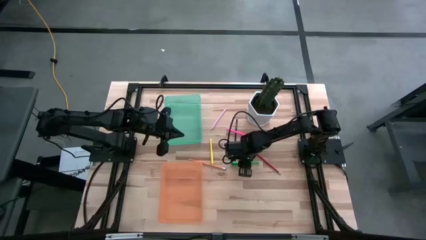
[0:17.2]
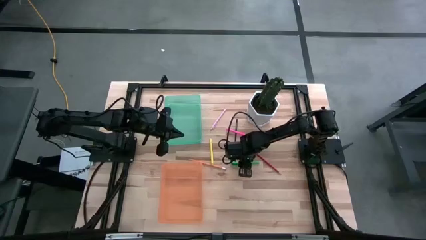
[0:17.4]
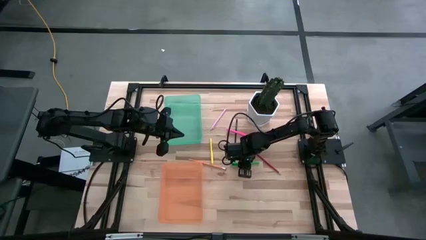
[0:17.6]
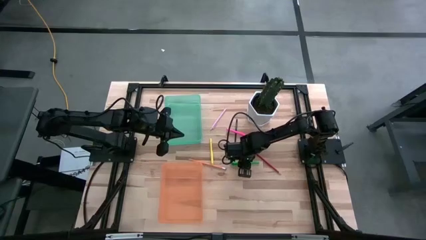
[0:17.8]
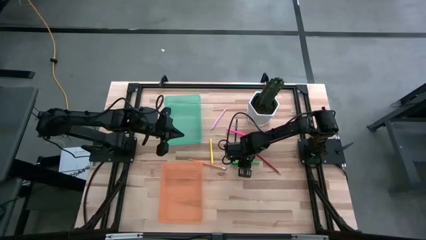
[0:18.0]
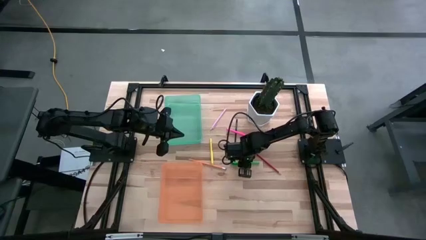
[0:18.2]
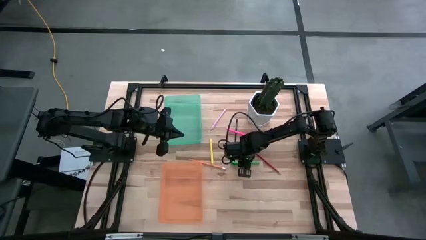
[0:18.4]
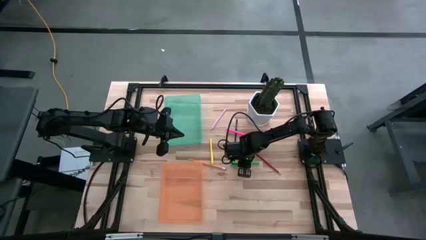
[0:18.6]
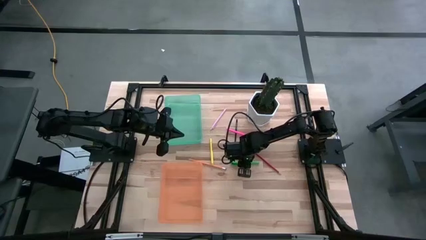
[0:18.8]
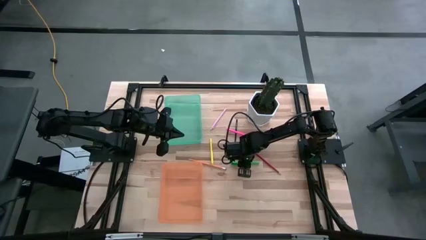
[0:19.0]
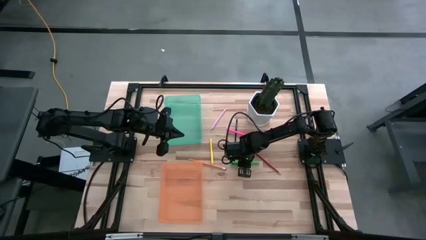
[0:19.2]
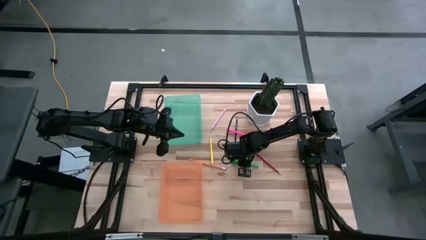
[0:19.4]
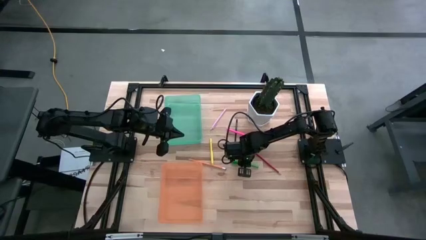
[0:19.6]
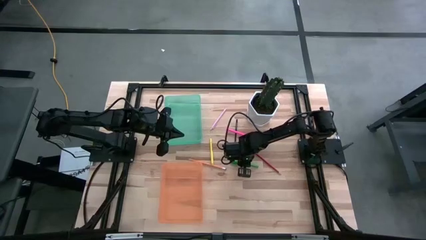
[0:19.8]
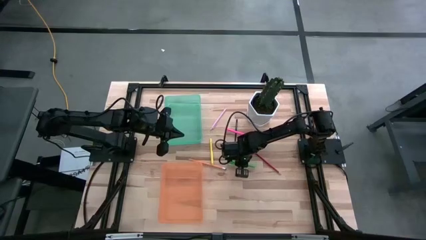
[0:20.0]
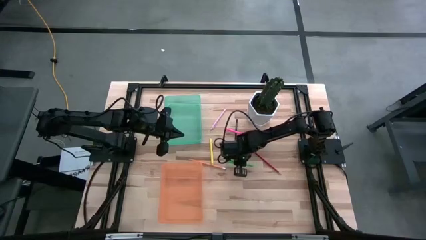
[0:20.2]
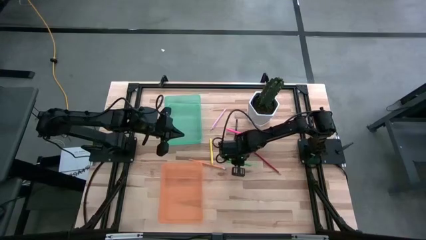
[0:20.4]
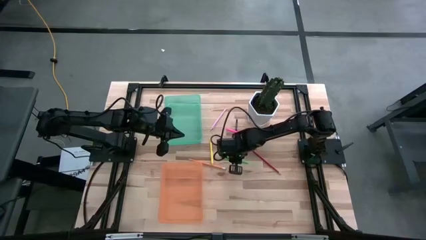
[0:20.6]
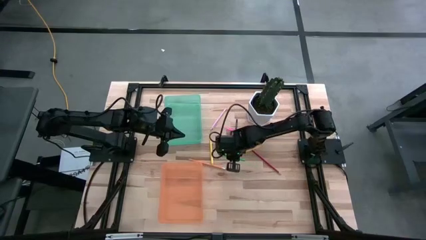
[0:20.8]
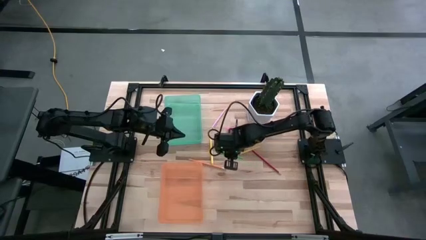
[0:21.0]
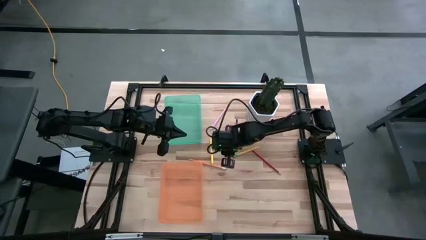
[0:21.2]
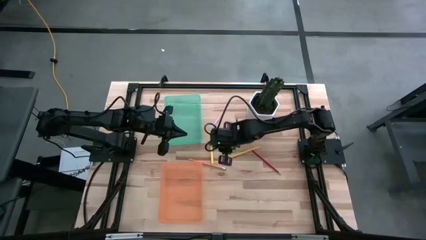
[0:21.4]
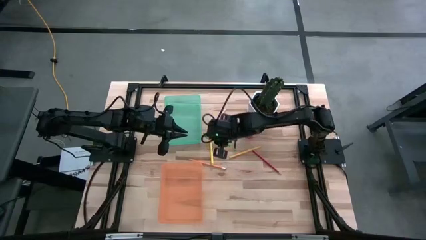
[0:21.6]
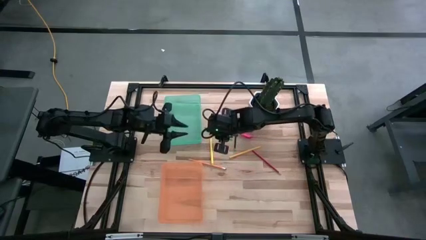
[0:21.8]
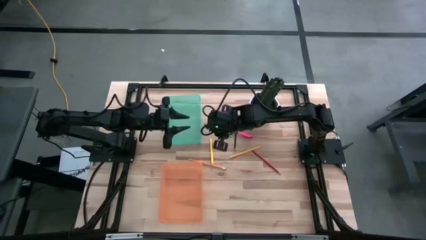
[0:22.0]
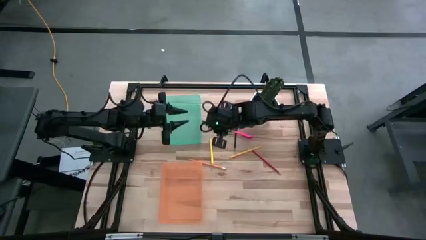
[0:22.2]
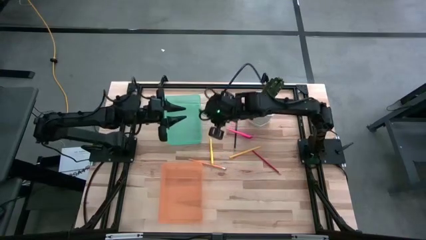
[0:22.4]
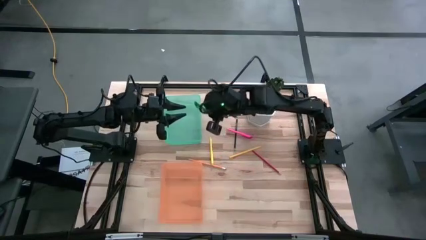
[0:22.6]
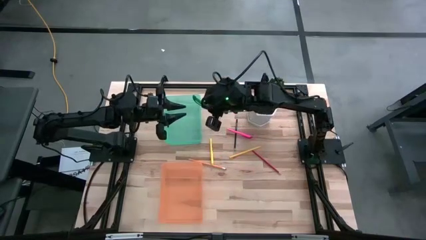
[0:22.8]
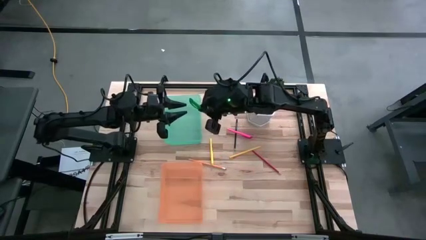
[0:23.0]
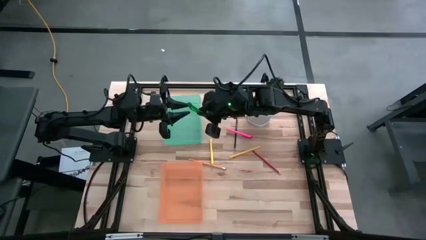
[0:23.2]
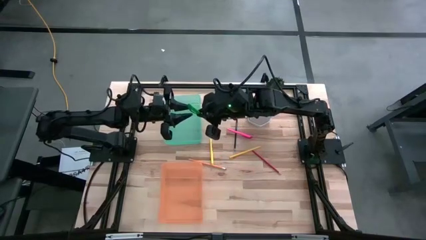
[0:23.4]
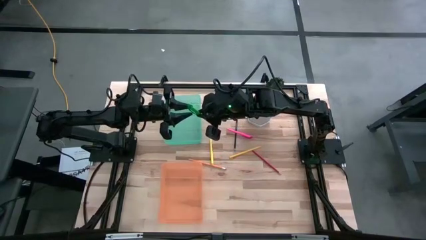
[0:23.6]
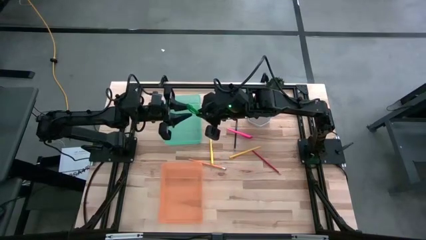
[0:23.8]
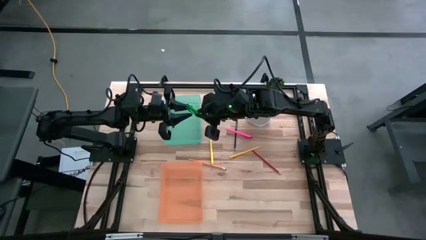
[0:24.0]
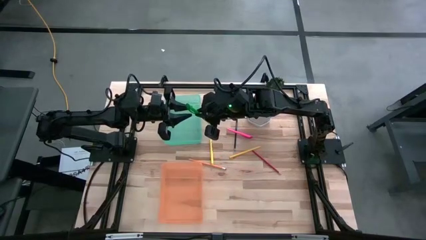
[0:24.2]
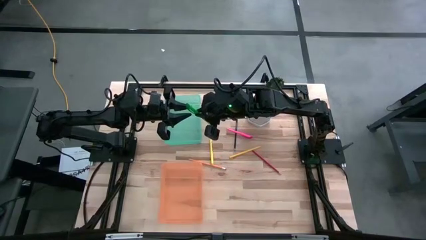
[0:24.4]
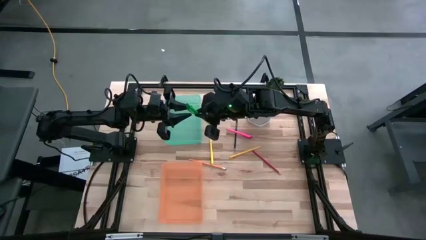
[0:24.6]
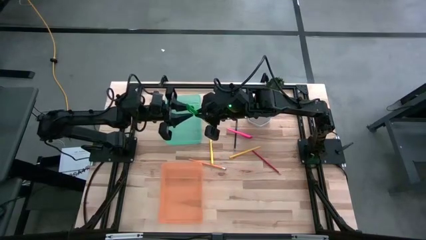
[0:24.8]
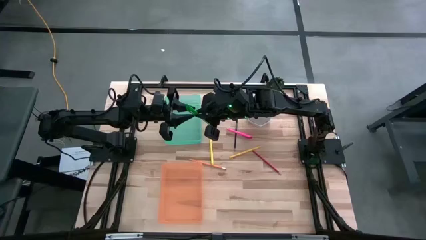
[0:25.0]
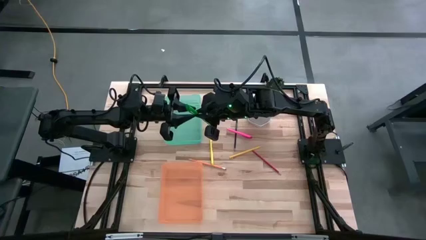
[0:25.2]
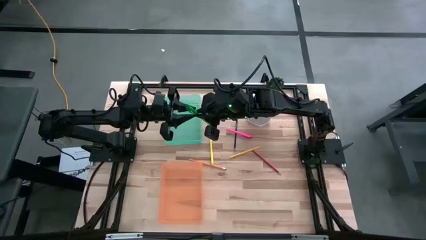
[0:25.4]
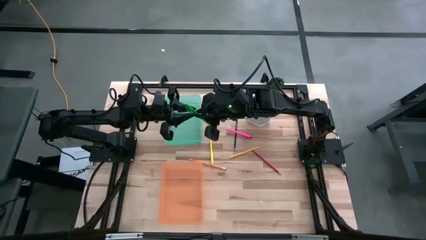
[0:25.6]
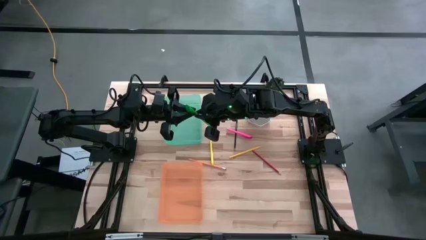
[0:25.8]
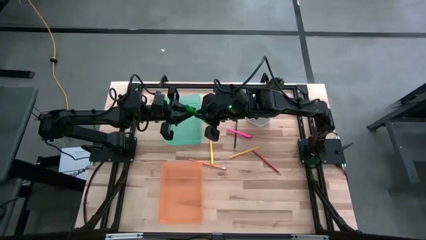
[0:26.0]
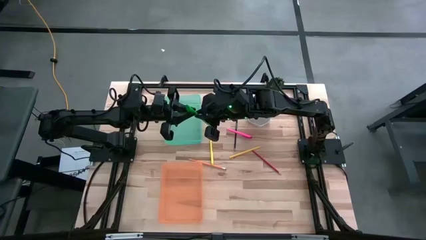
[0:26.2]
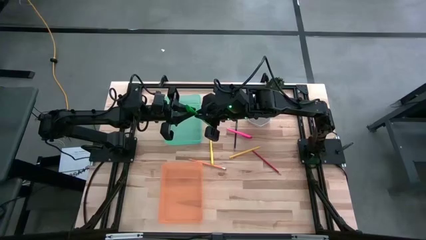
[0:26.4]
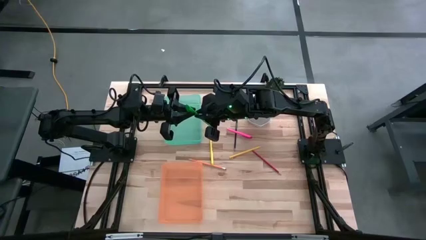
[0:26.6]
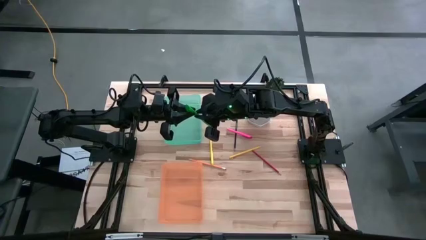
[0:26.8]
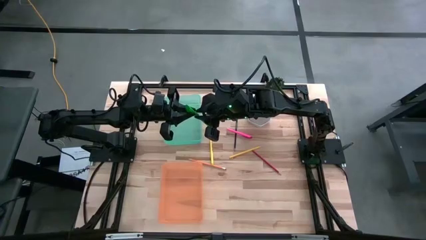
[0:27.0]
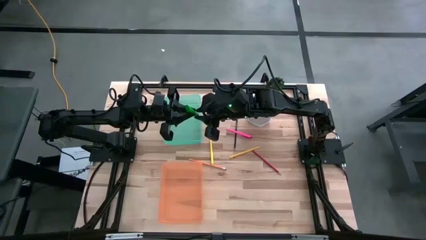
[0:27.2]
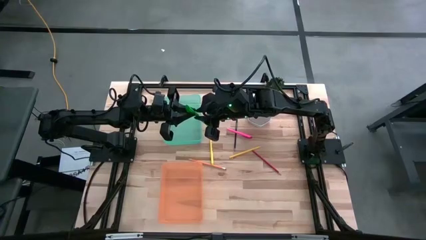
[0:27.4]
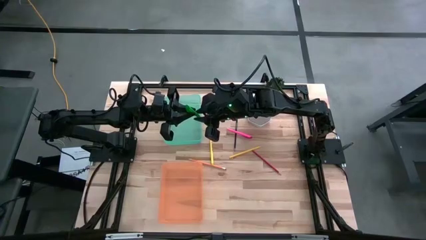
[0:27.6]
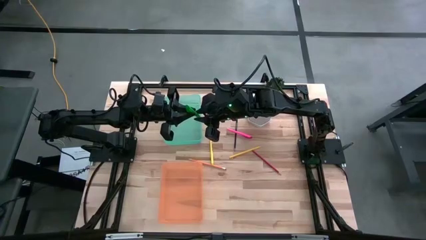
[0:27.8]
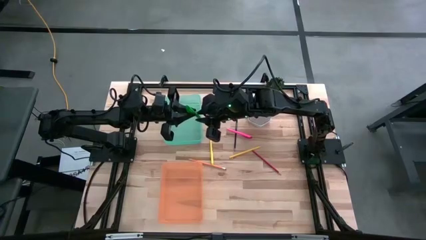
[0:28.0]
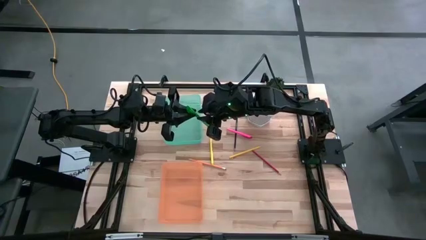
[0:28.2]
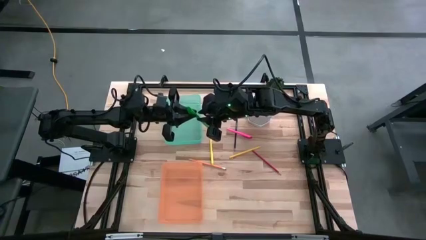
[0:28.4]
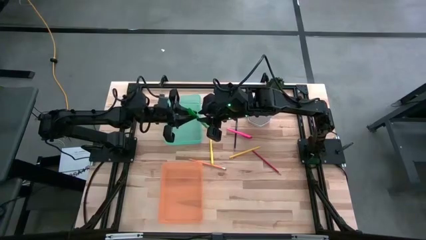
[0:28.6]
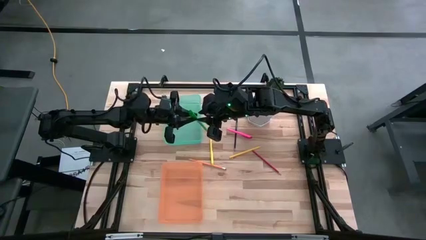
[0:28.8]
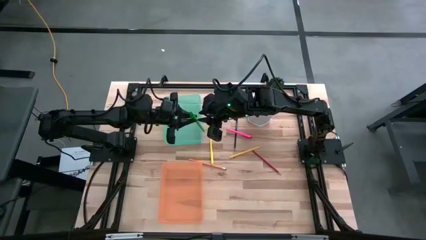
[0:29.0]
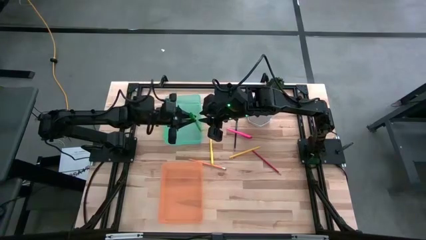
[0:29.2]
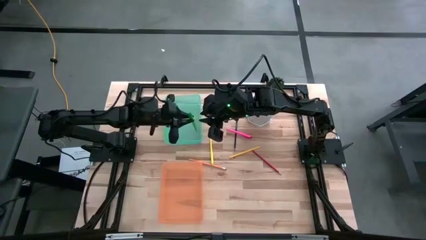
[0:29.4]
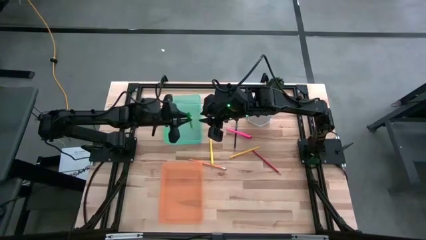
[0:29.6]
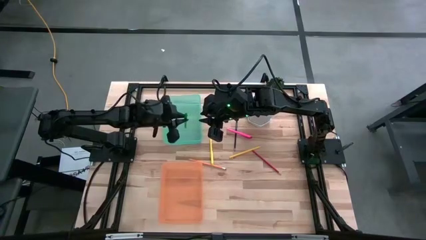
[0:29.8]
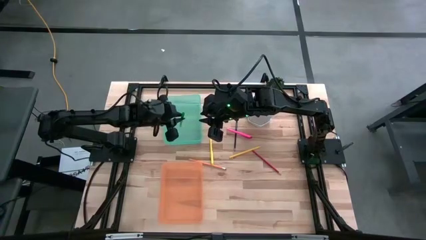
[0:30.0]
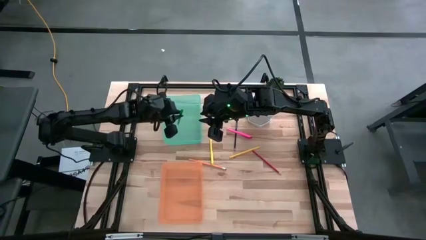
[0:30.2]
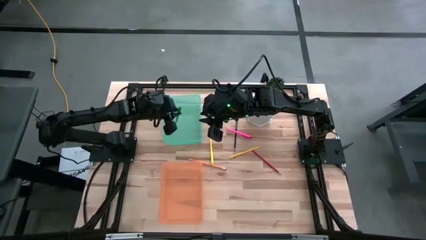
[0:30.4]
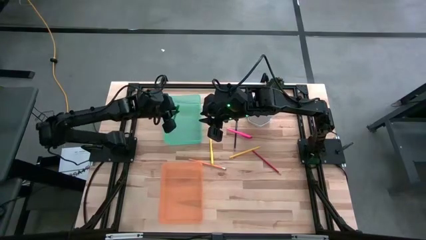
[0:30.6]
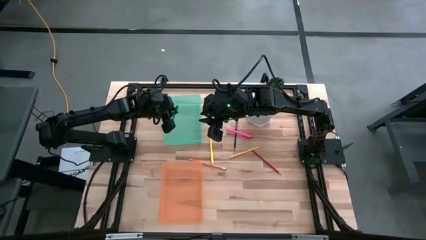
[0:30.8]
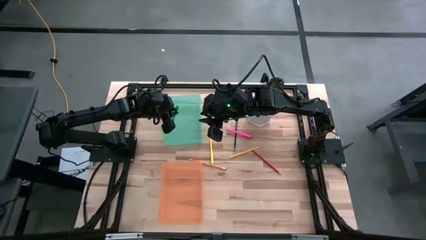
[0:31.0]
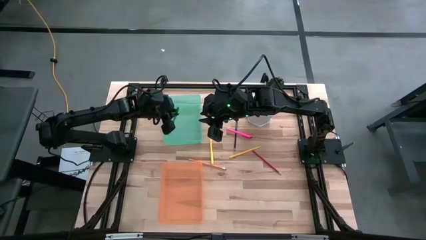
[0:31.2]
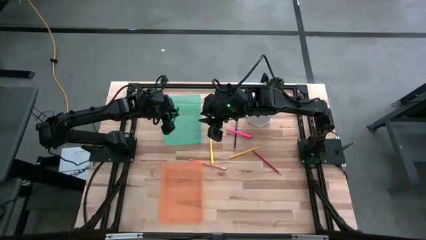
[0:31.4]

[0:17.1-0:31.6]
Task: Sort pens & pencils
Put the green pen into the green bin
